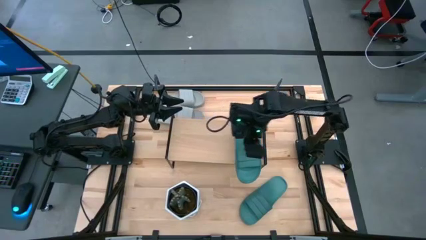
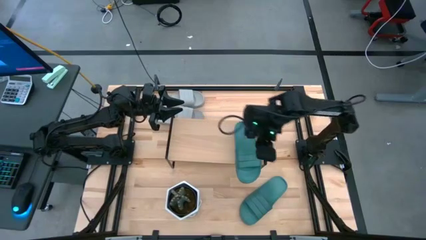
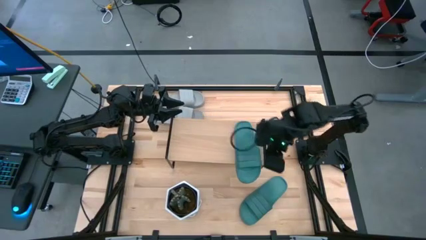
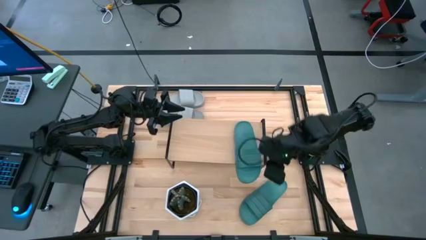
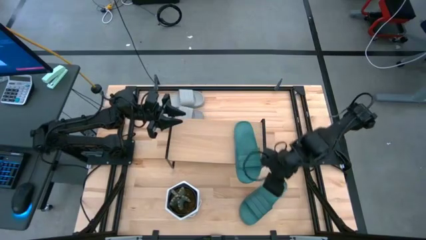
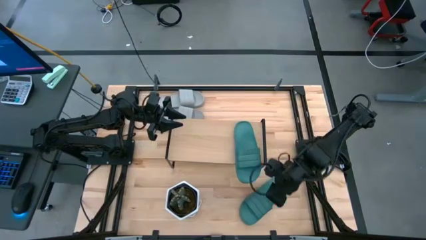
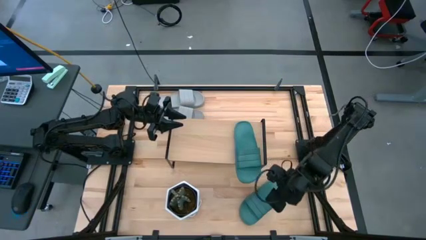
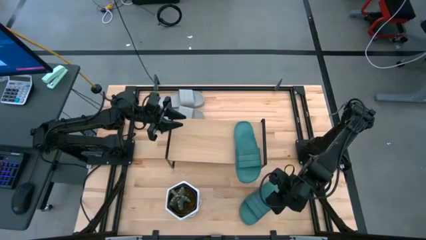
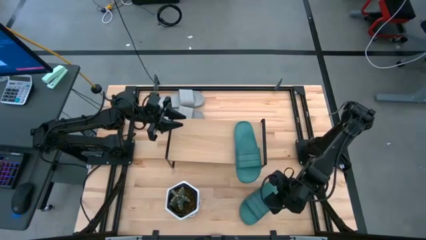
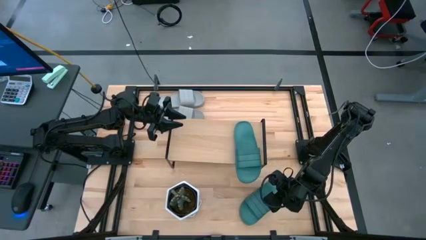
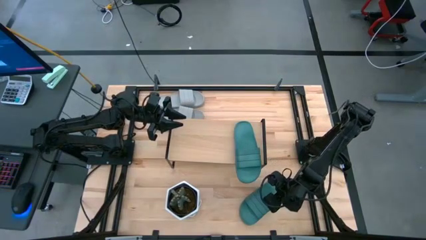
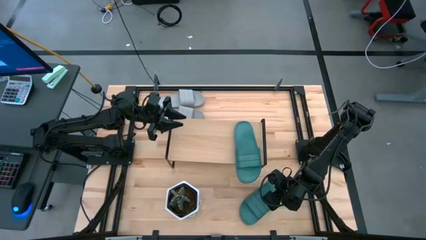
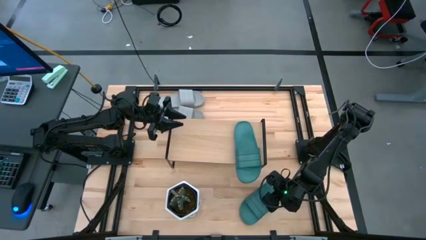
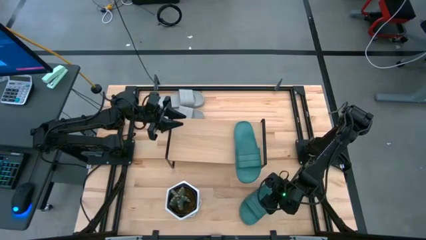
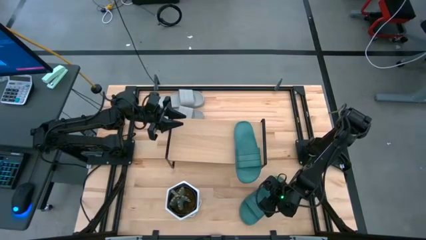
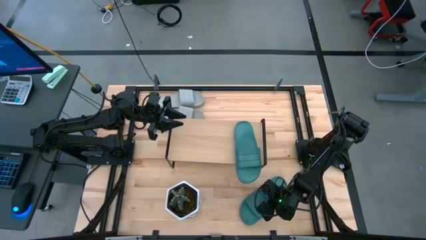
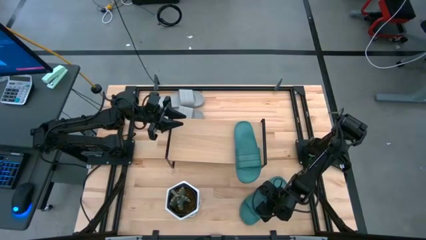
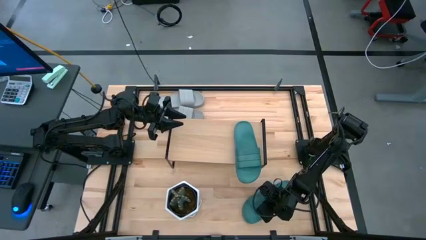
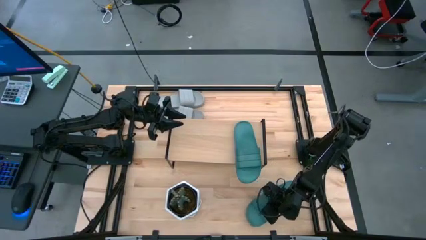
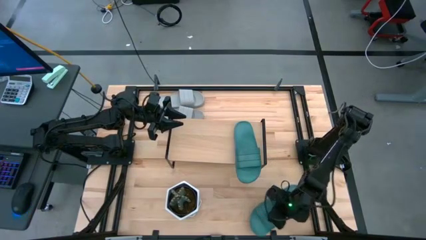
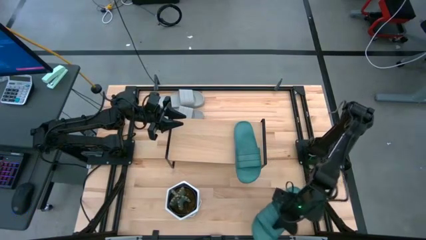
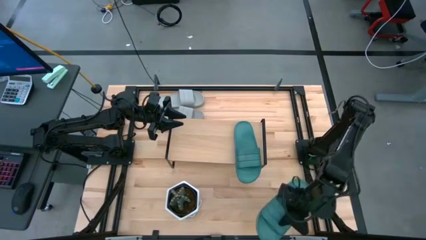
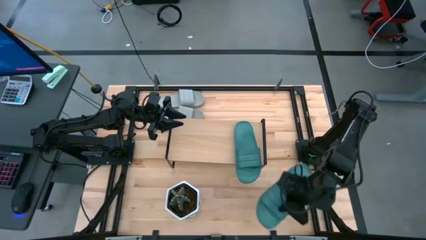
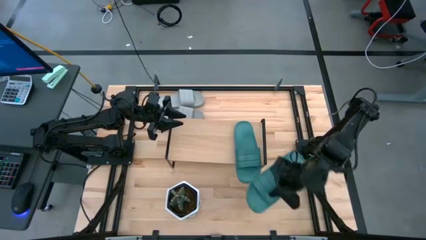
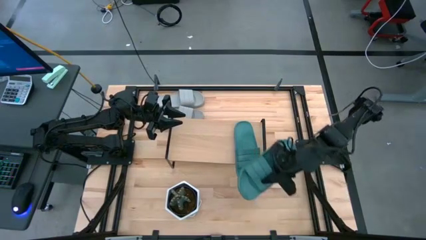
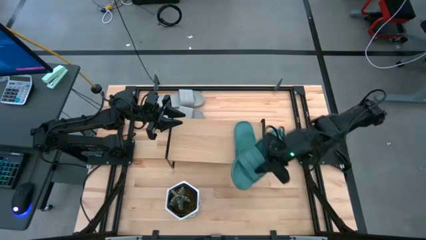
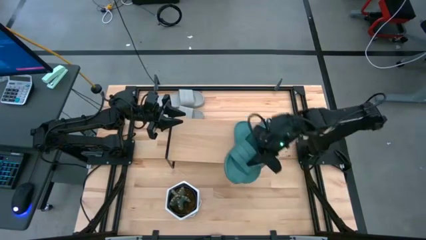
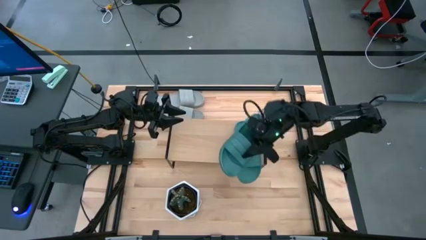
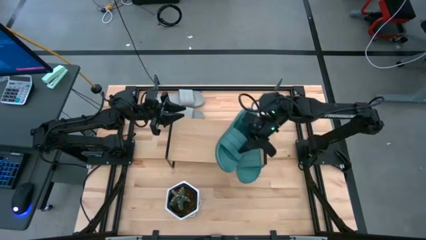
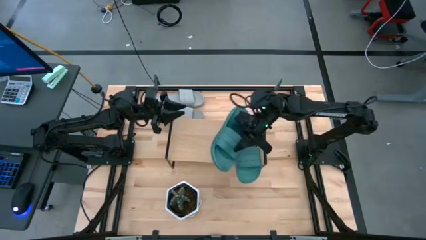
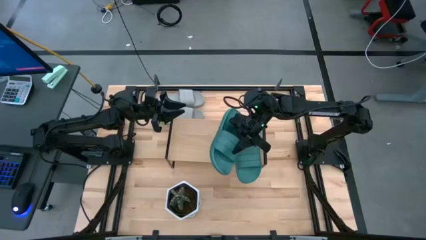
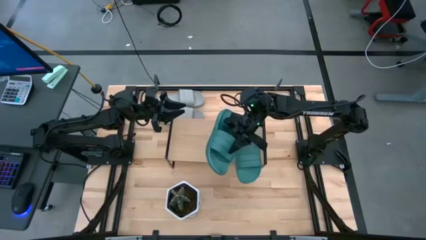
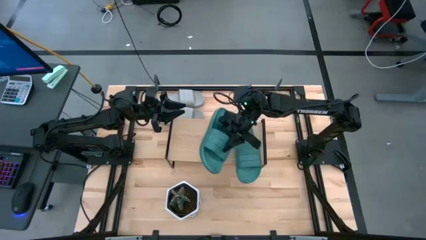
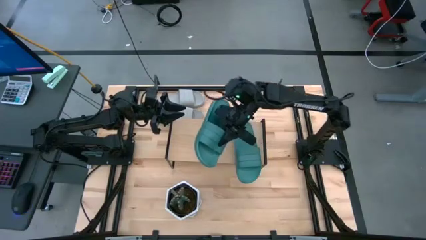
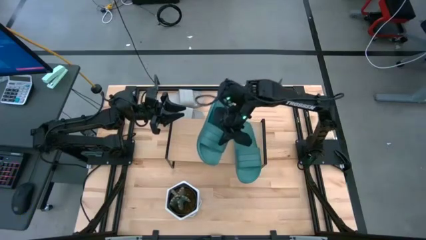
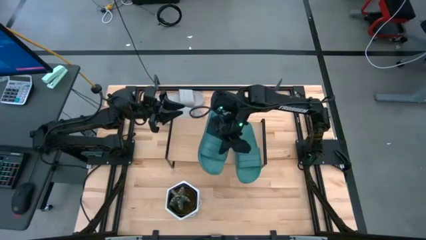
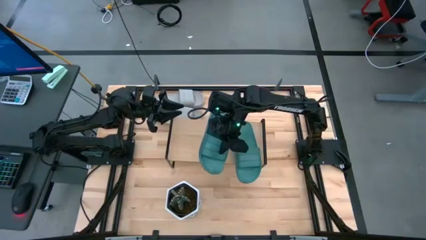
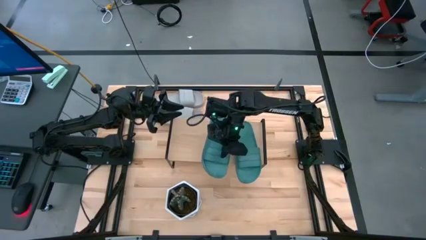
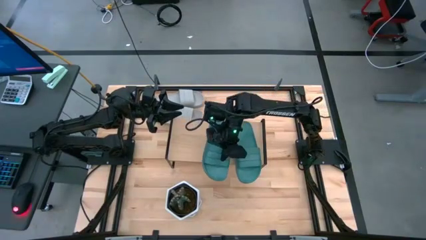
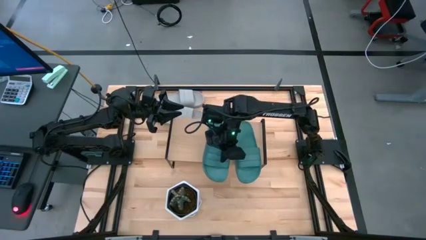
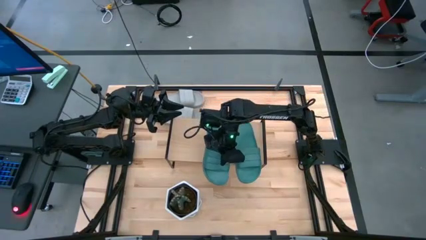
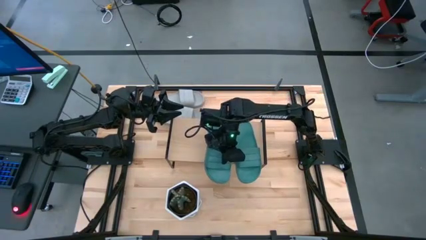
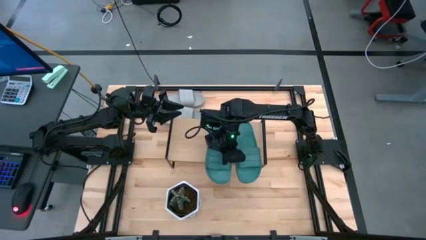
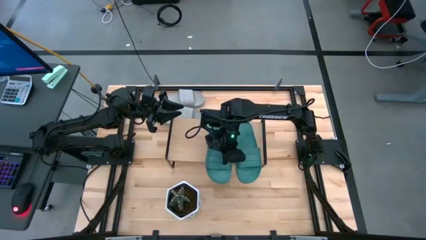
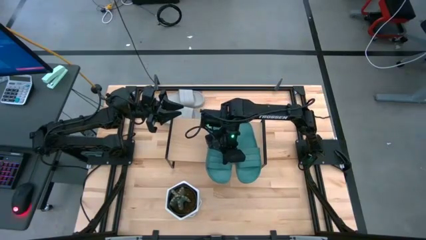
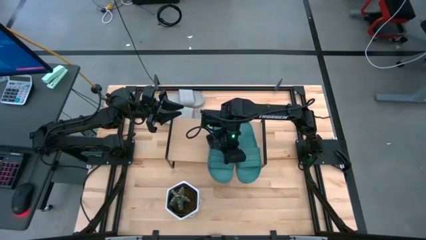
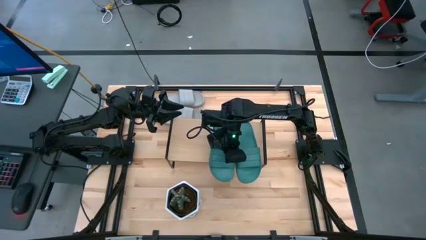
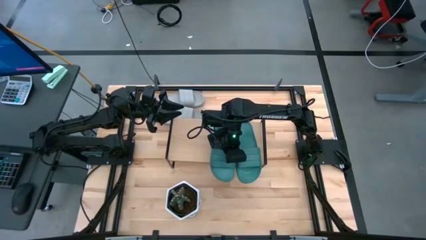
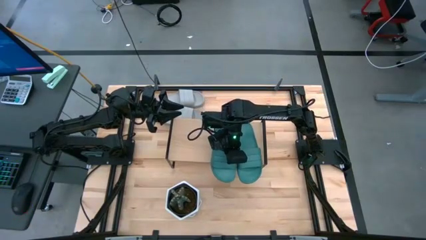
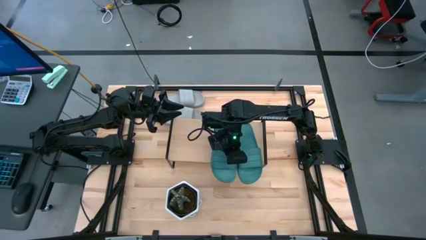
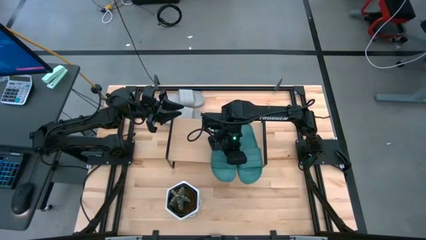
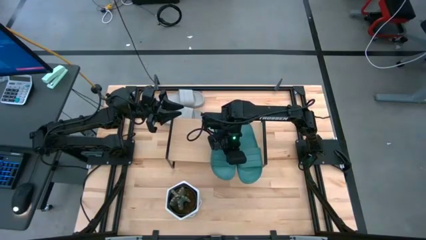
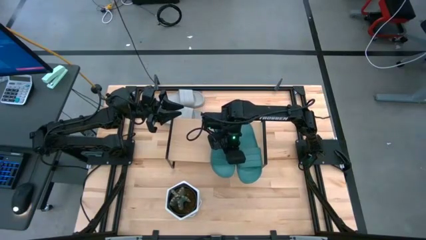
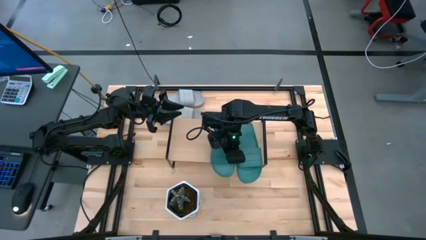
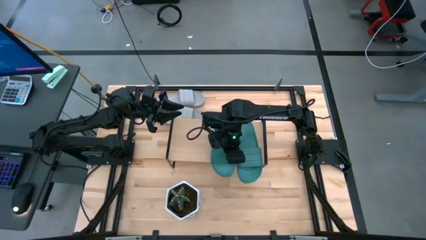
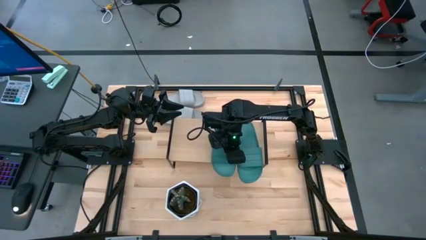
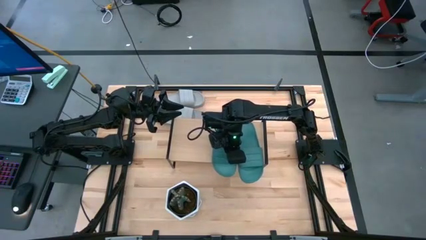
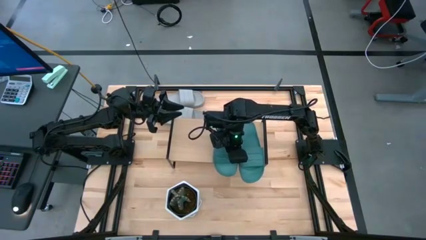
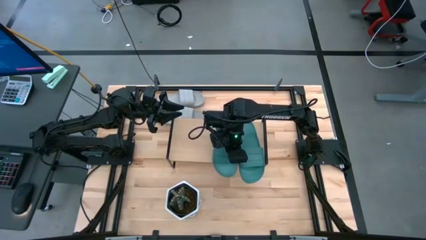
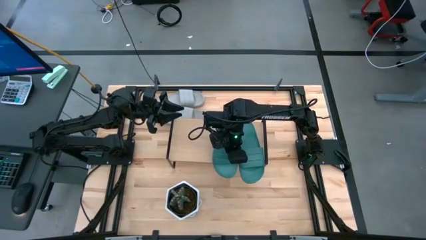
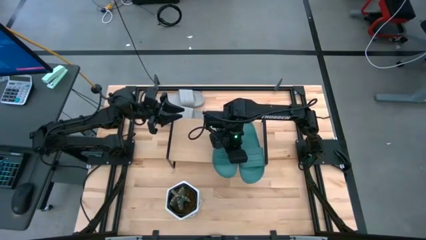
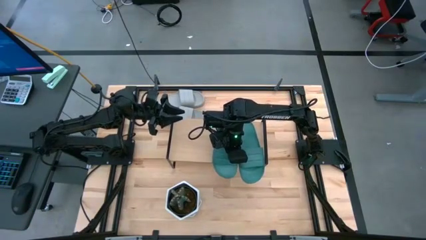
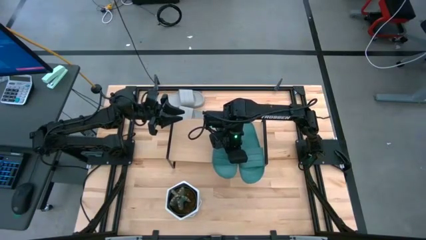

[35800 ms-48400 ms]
Task: Pick and place slides into the shelf
Put the green slide on the shelf

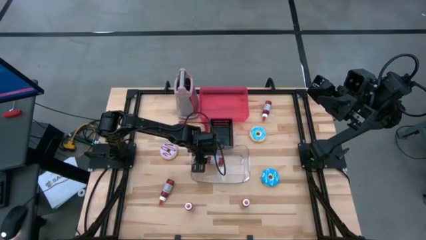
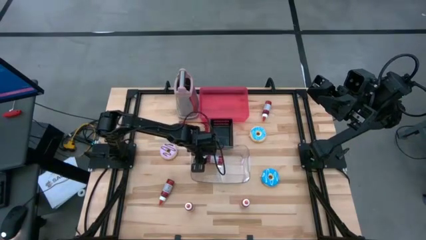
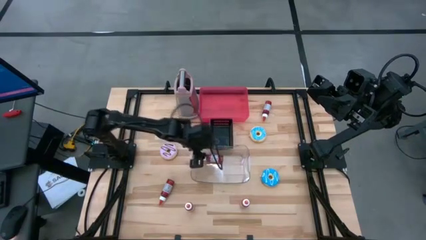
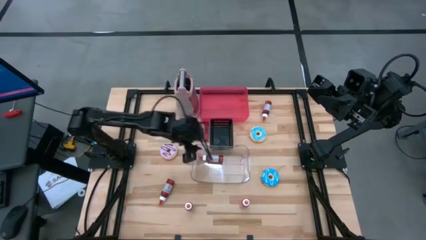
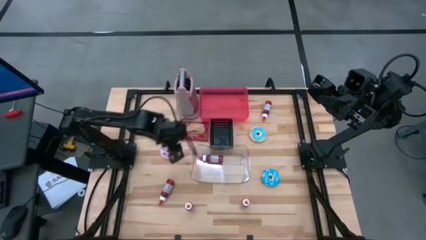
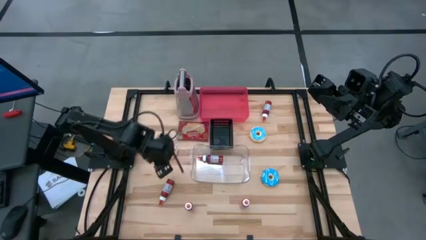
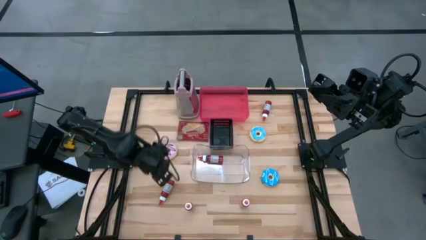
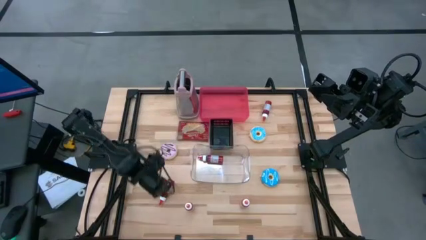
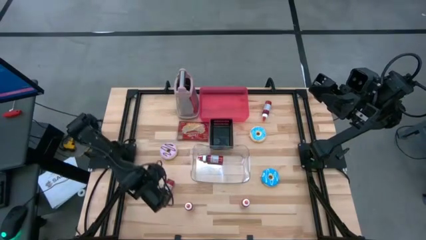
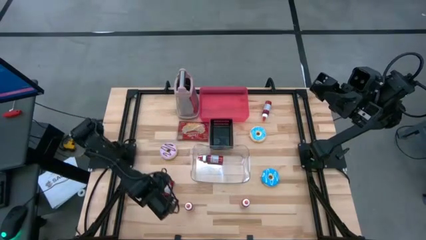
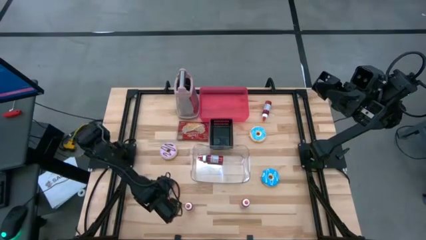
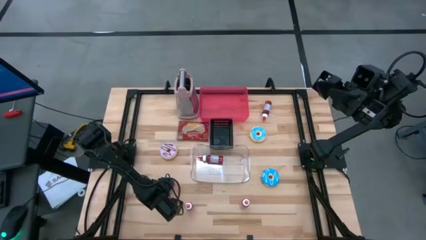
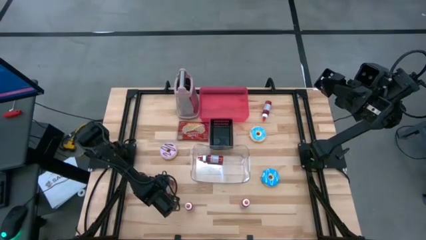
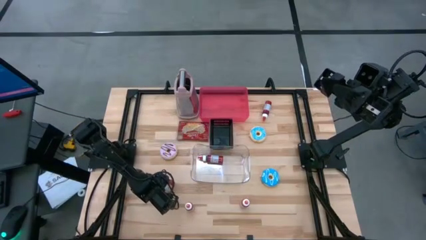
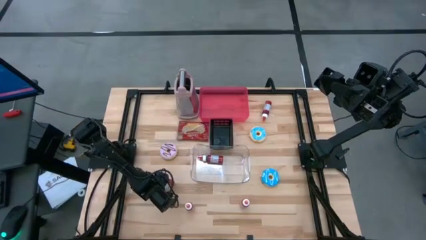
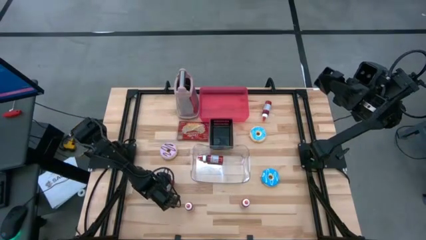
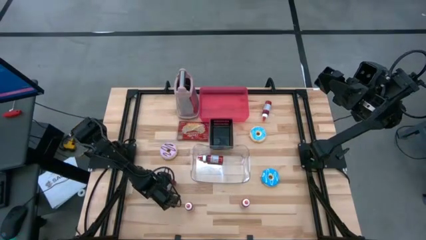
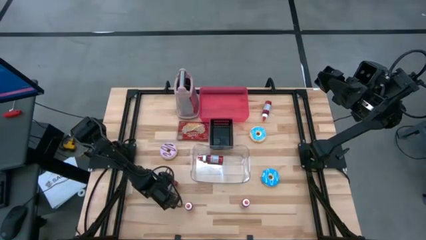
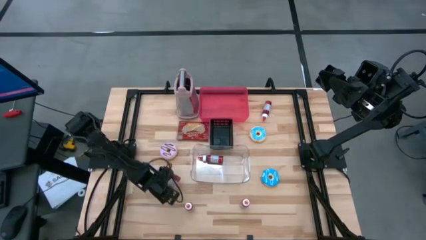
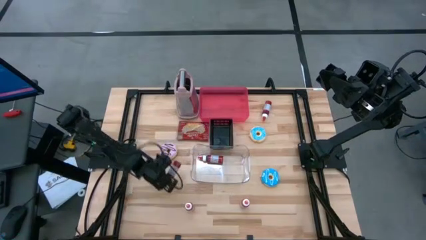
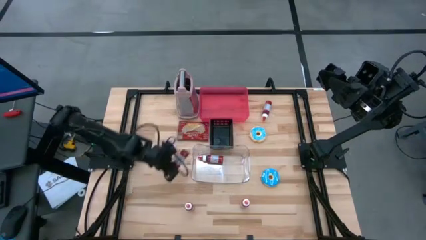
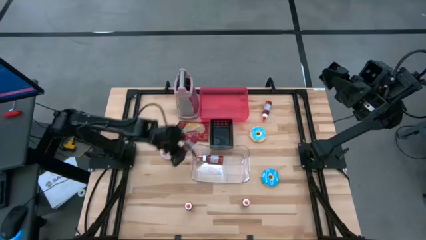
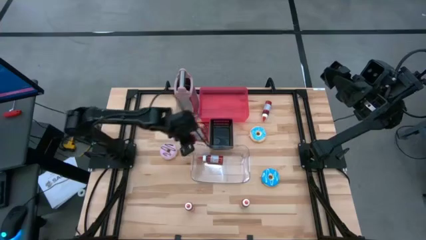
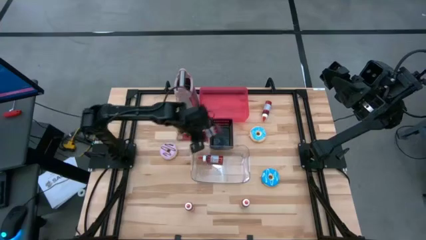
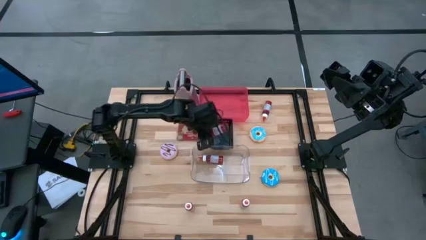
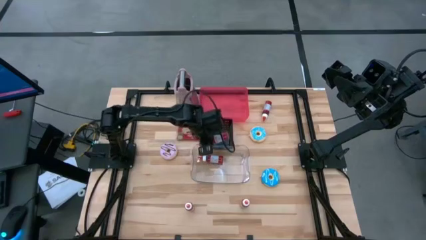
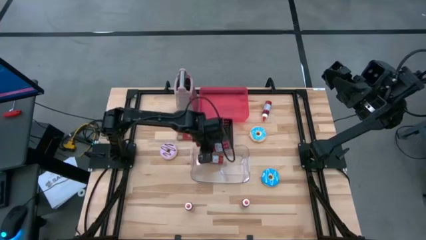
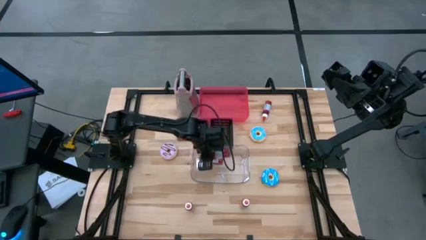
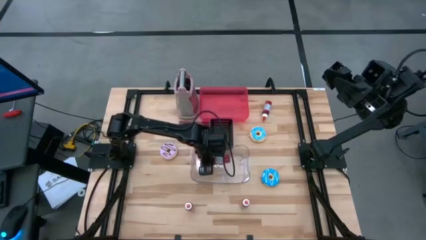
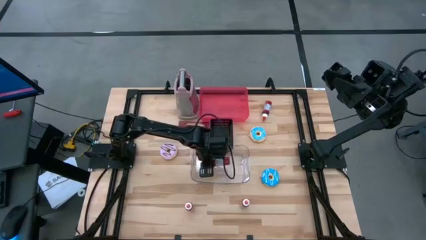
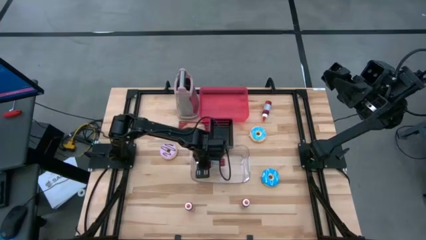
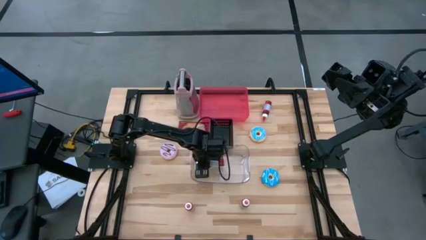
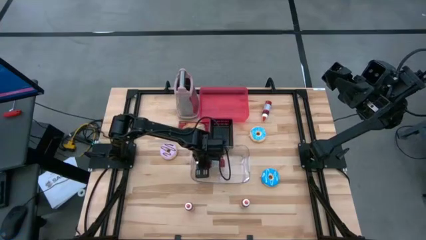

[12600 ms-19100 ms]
Task: Pick & Place Food Item
Put the left red food coloring bottle into the transparent bin
